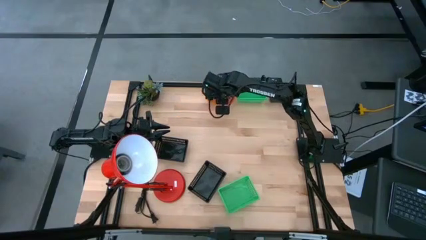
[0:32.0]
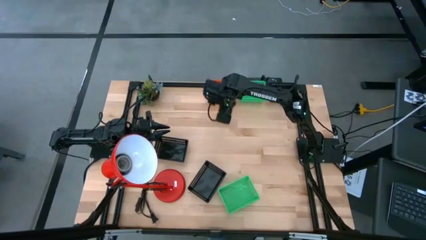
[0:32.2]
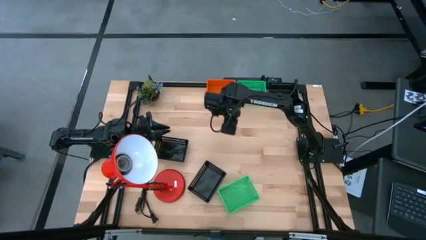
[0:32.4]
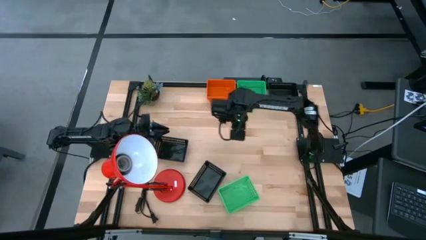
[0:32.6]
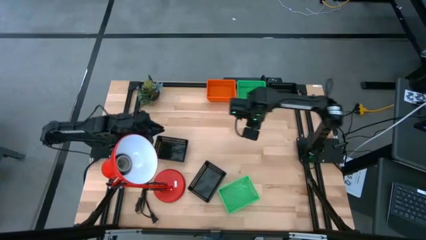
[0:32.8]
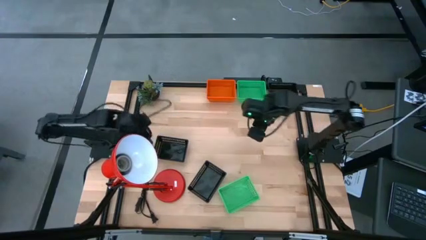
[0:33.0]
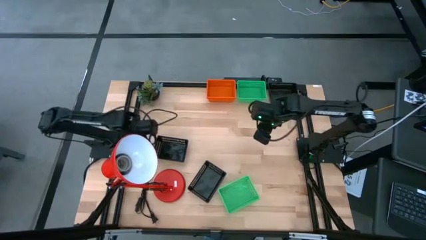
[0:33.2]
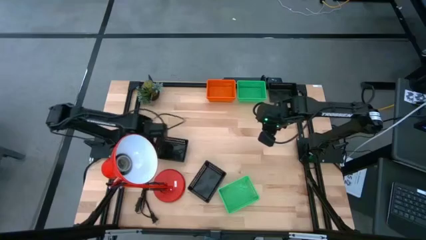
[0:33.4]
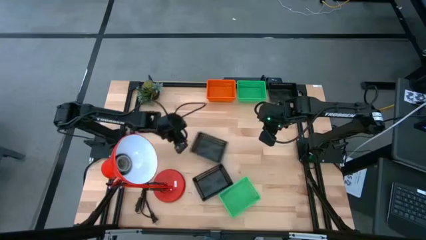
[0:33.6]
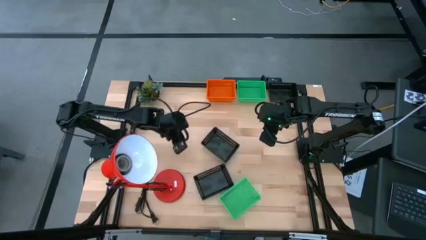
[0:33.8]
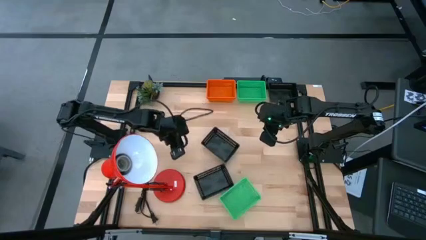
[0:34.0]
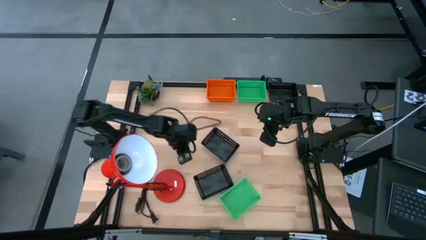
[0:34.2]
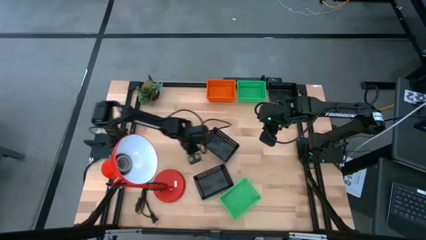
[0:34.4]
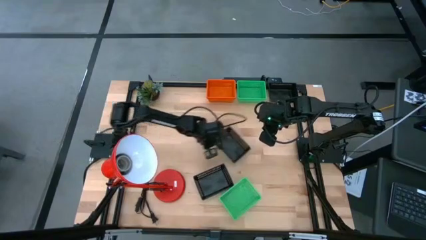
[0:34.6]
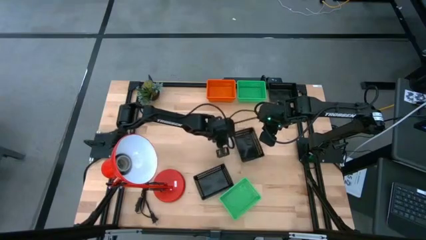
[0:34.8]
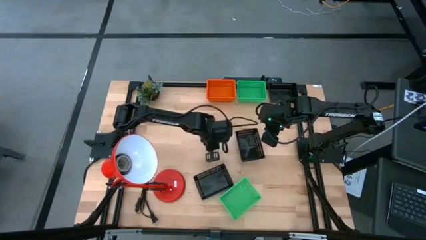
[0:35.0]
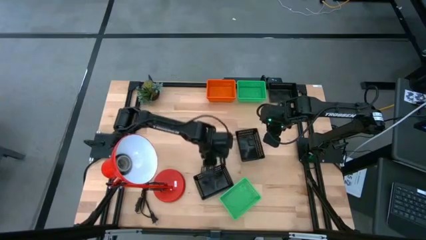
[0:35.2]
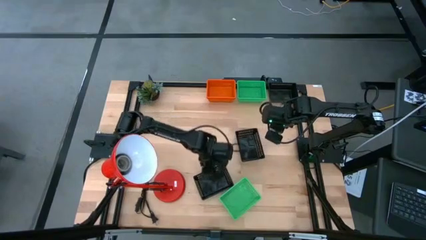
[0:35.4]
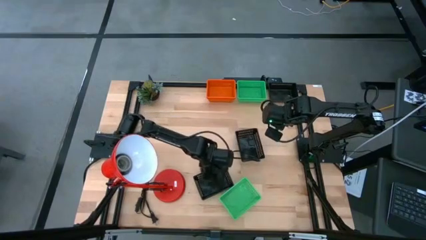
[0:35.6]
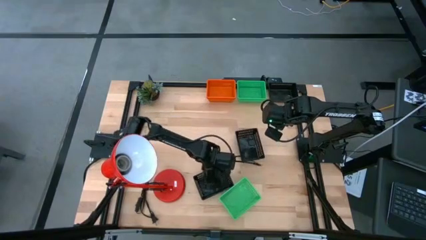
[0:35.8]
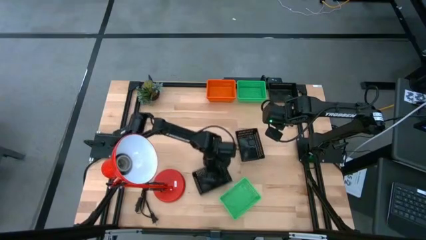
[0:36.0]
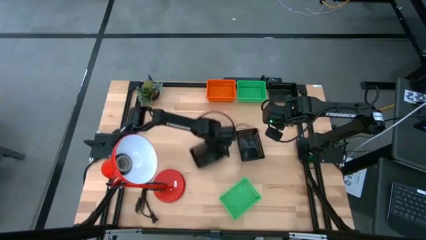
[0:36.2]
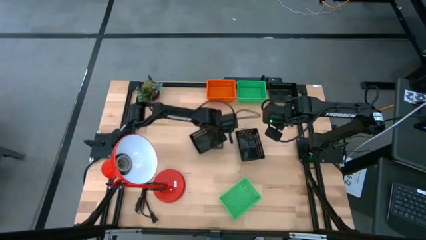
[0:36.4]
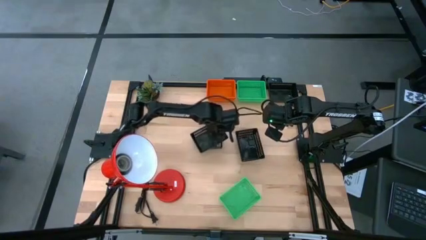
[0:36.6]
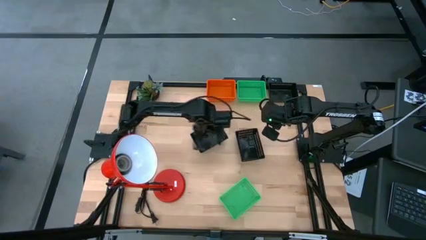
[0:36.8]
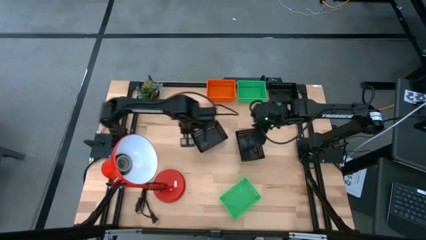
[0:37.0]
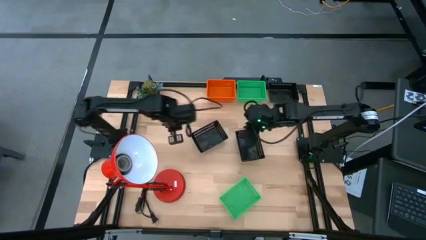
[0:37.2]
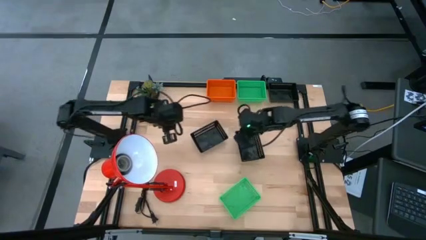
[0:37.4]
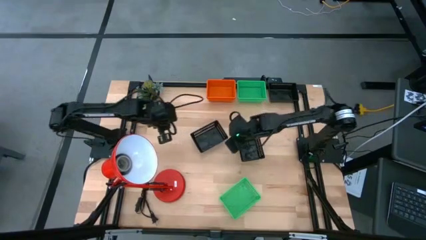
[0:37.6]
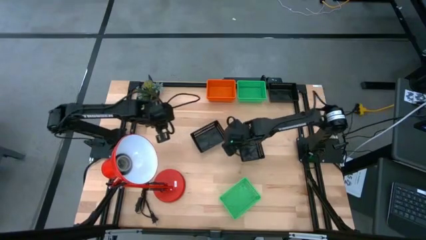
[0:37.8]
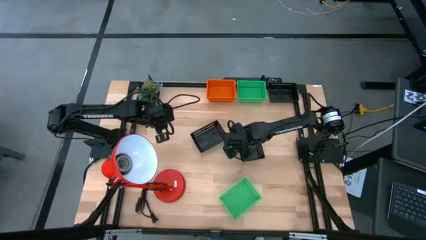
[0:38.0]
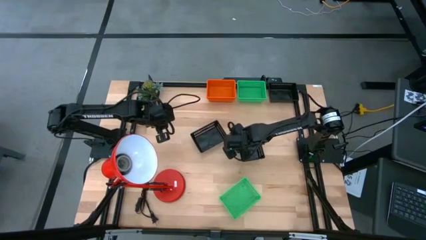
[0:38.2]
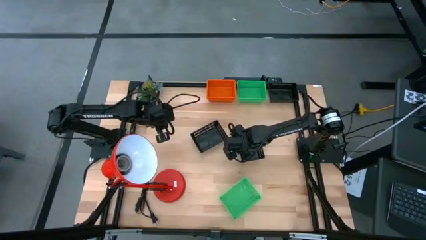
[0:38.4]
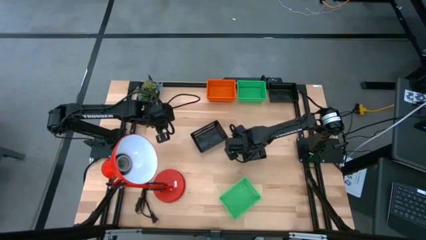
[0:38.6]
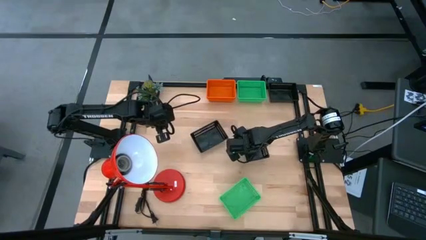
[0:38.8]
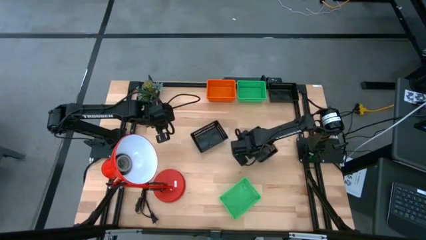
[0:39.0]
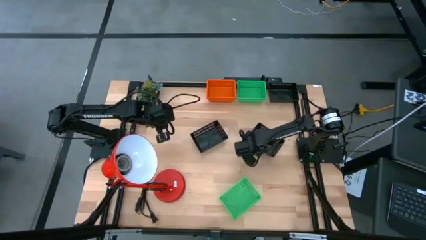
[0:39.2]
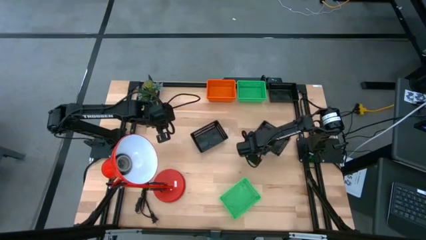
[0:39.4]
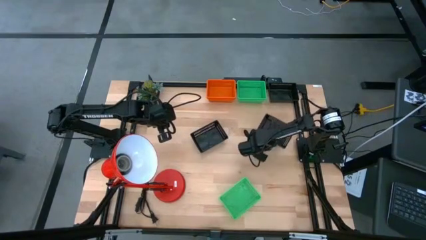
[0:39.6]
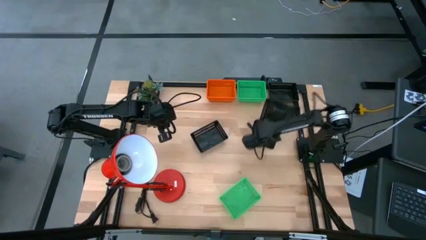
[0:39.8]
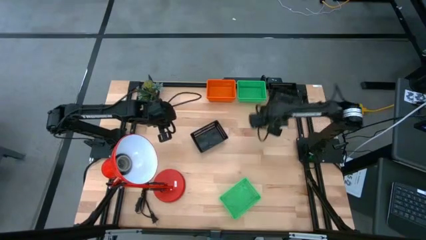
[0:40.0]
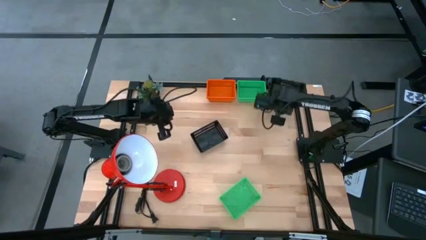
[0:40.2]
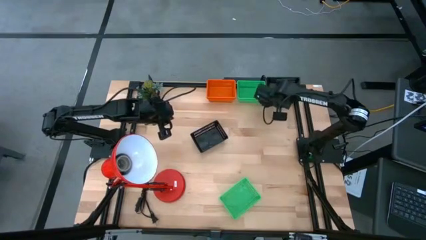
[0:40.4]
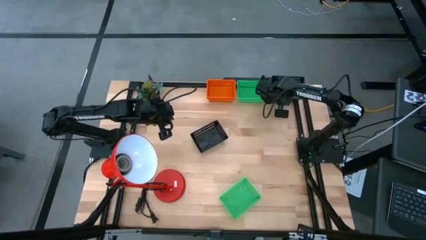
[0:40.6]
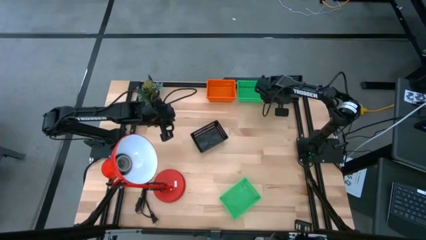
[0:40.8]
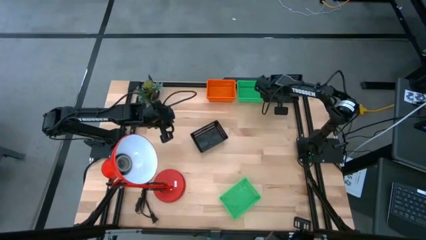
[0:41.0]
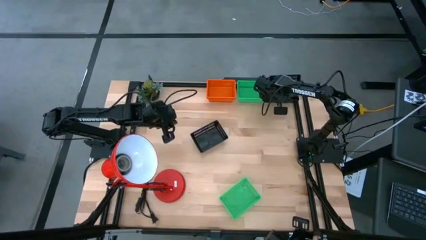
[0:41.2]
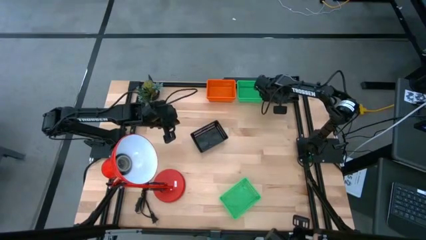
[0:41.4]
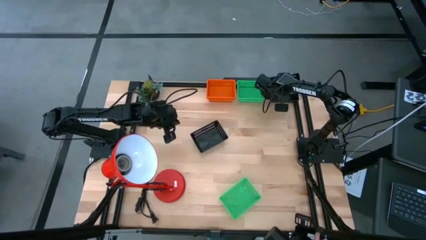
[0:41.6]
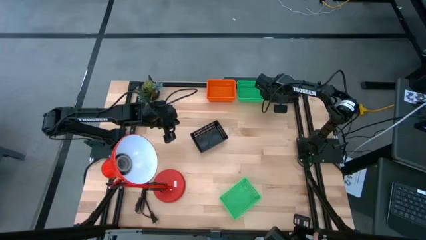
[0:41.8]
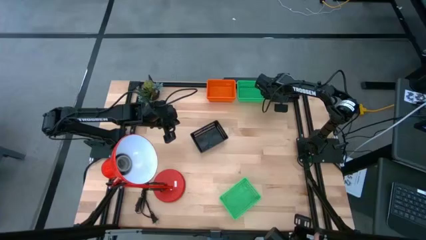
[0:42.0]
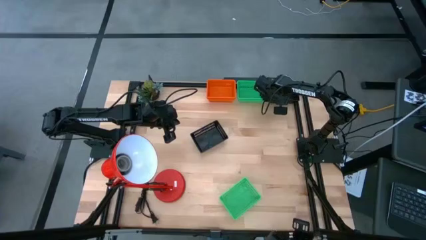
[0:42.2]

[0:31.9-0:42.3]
Stack the right black bin on top of the top black bin

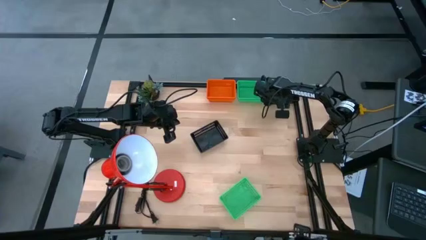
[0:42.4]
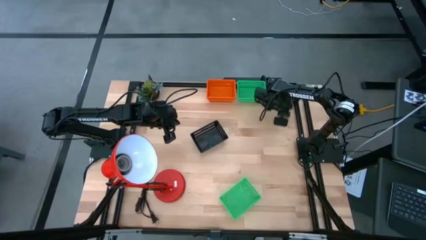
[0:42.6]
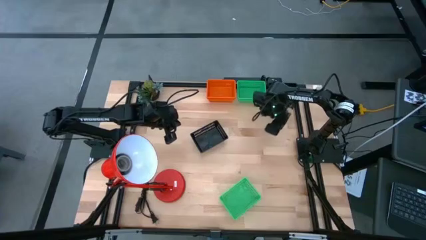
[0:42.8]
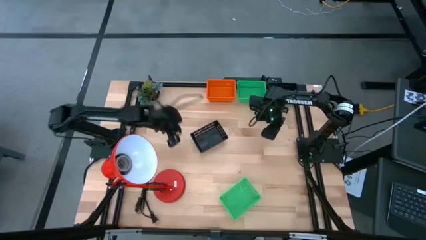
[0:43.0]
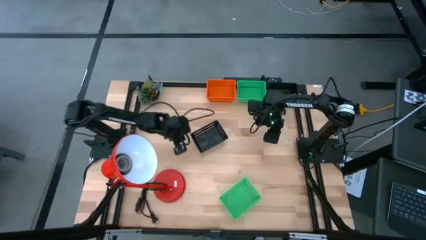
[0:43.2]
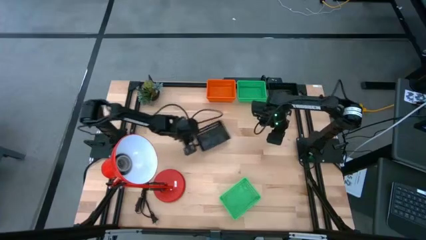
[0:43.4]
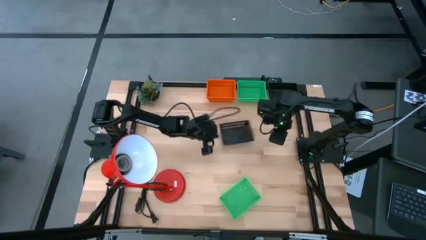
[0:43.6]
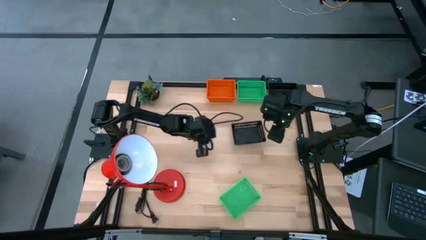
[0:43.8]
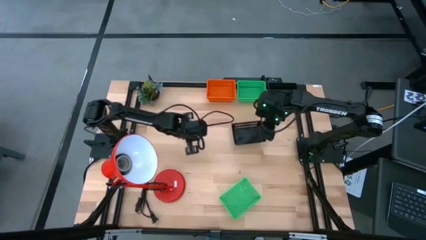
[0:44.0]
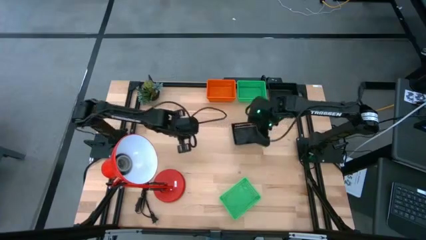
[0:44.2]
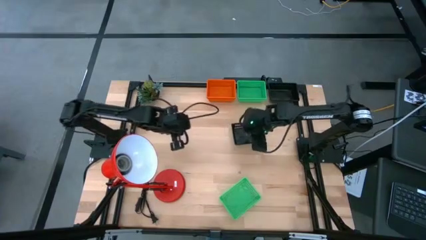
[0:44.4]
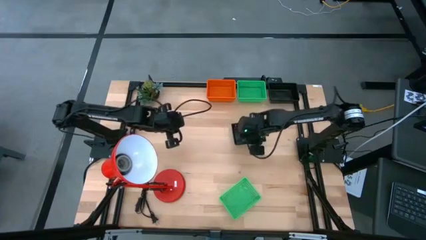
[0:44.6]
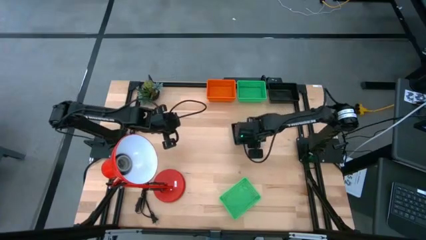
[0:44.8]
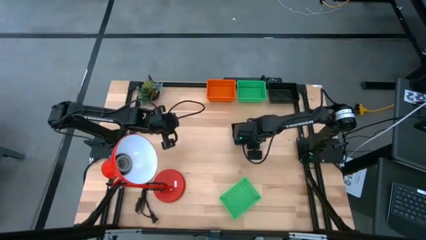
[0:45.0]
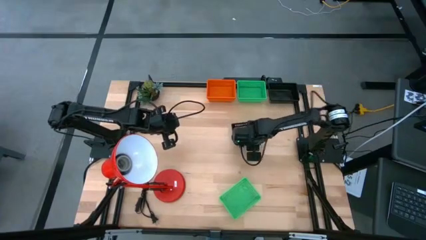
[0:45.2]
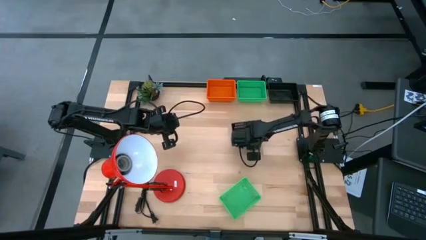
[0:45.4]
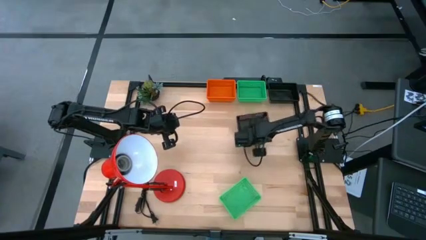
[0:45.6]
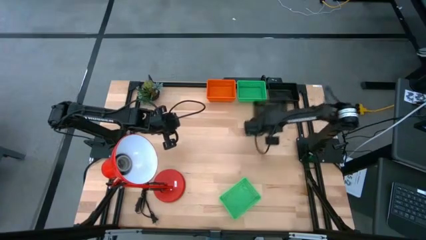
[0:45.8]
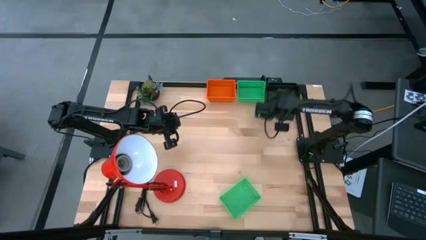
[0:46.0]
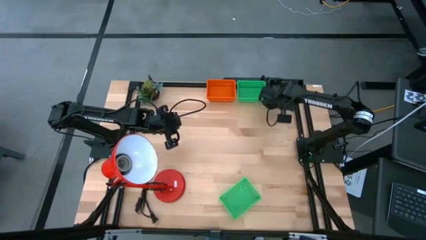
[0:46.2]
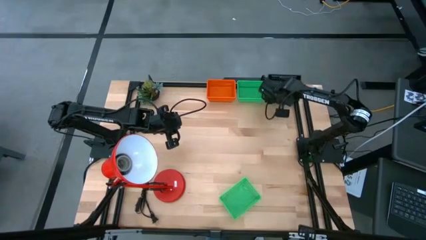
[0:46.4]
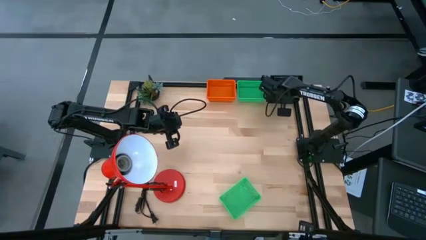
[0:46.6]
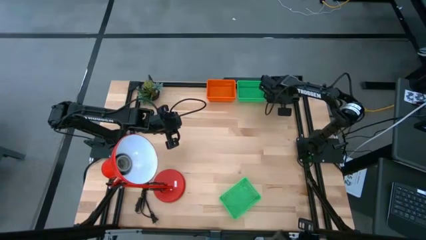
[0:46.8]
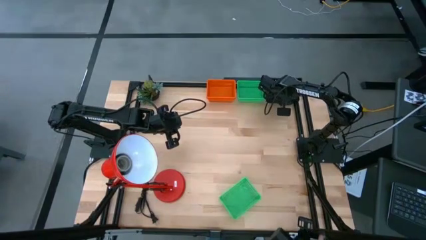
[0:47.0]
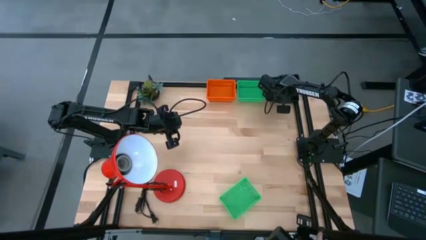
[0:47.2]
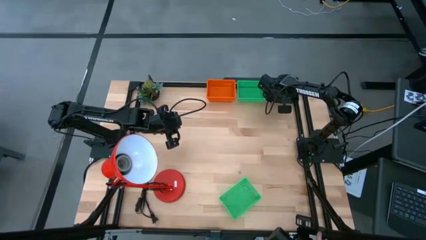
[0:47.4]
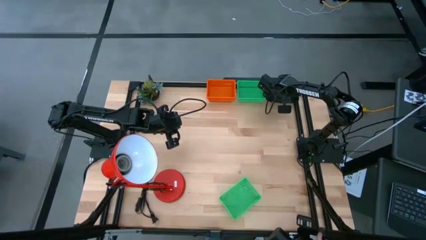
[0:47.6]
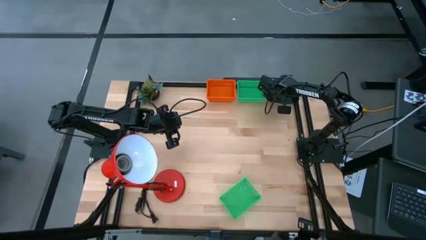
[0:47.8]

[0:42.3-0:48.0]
Stack the bottom black bin on top of the top stacked black bins
